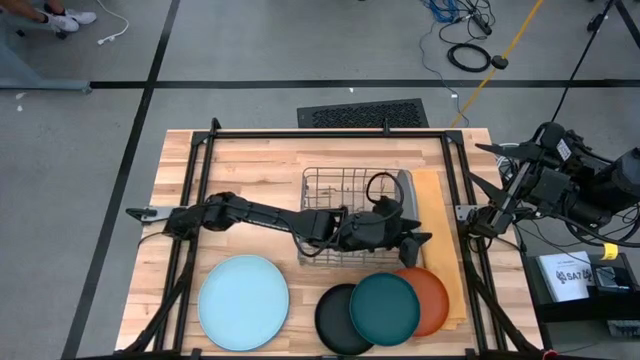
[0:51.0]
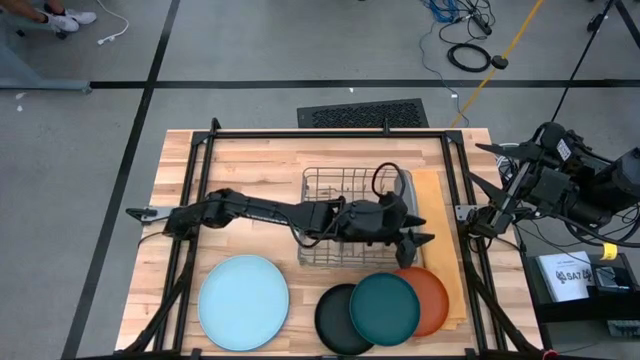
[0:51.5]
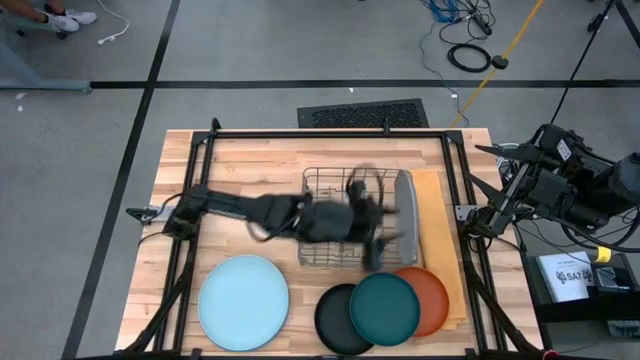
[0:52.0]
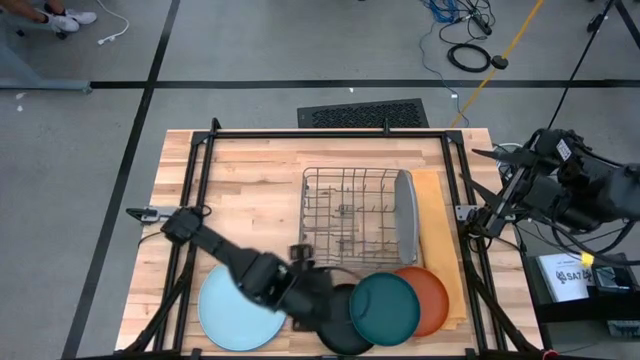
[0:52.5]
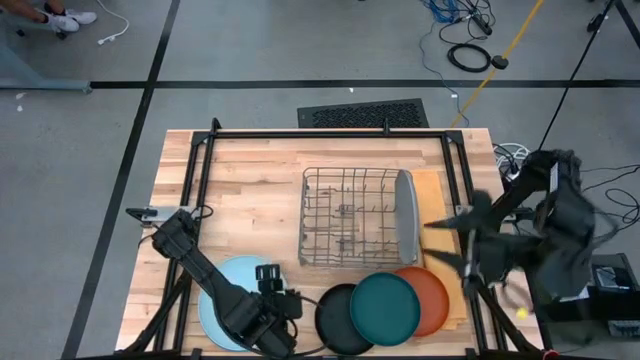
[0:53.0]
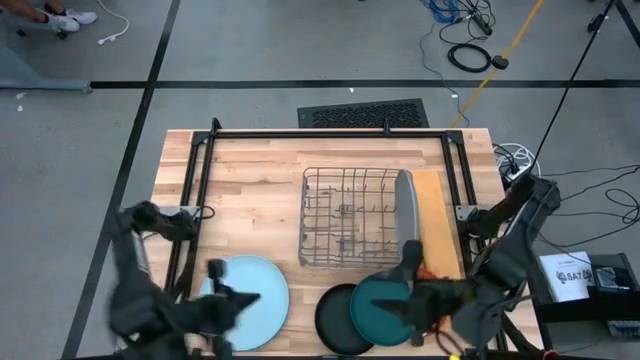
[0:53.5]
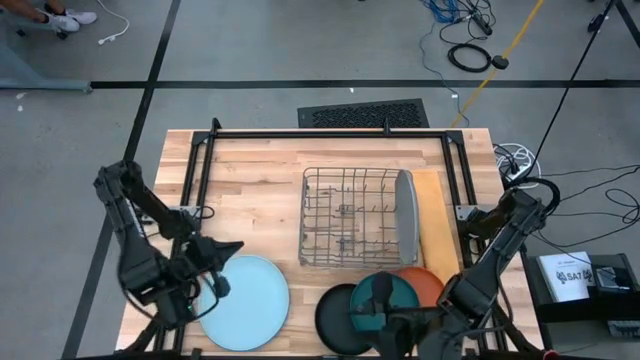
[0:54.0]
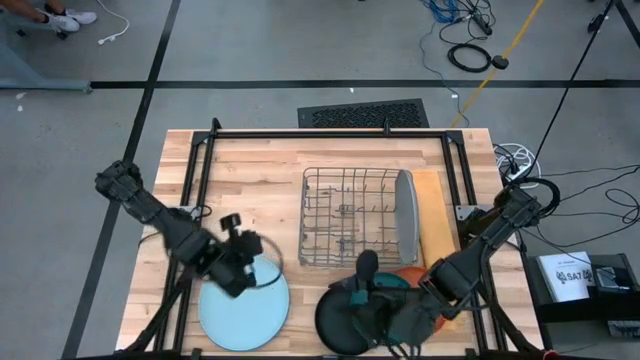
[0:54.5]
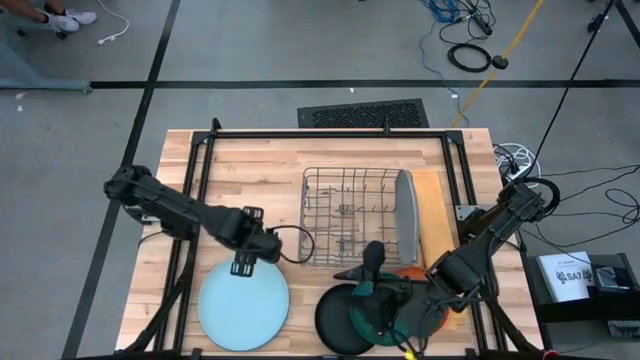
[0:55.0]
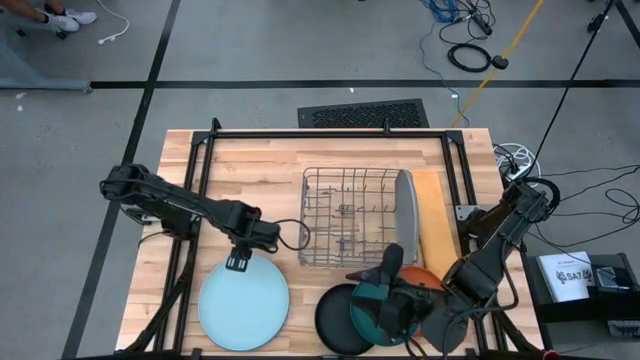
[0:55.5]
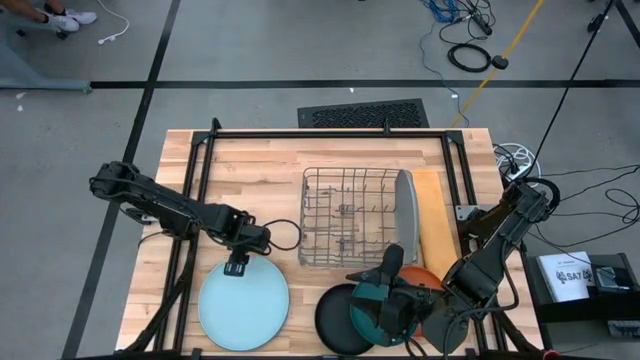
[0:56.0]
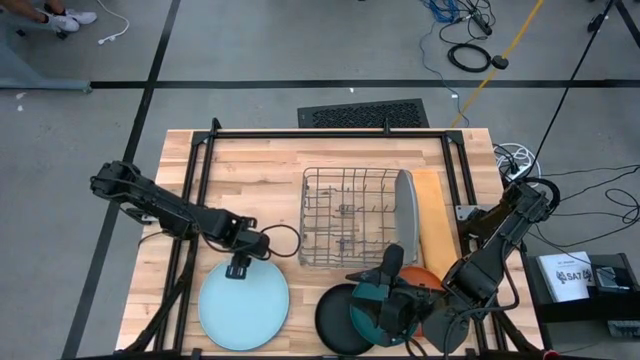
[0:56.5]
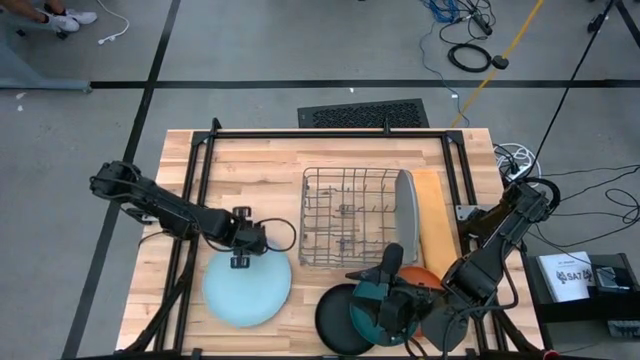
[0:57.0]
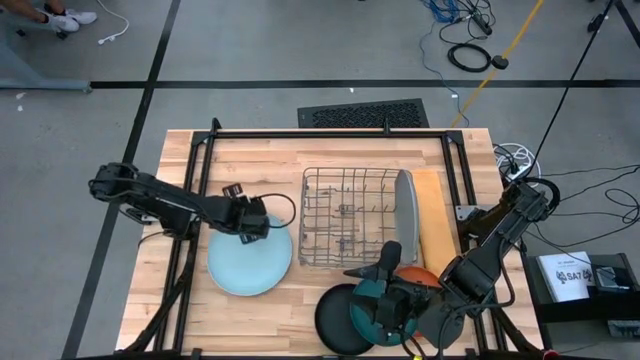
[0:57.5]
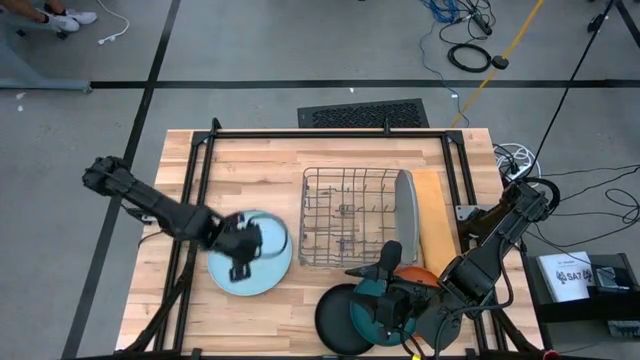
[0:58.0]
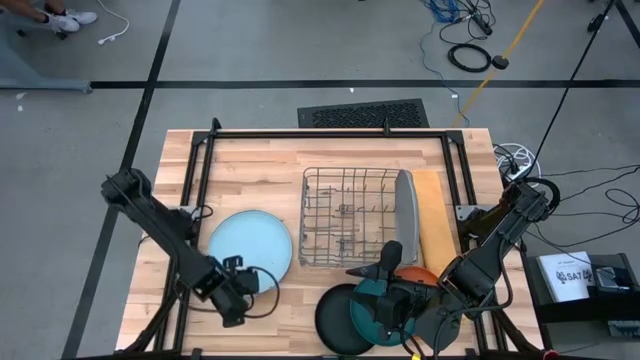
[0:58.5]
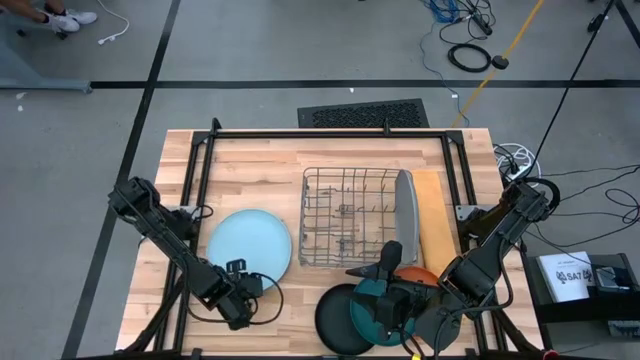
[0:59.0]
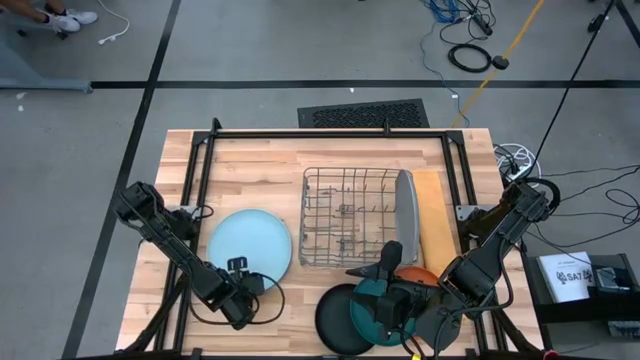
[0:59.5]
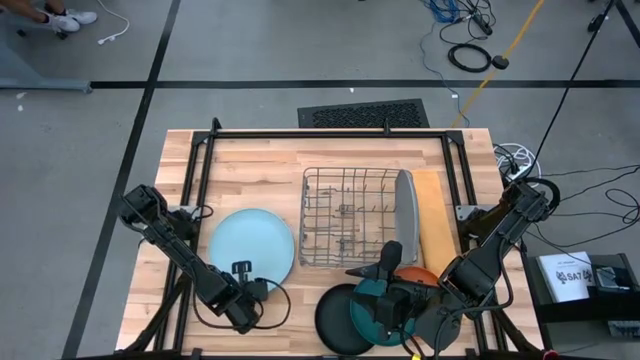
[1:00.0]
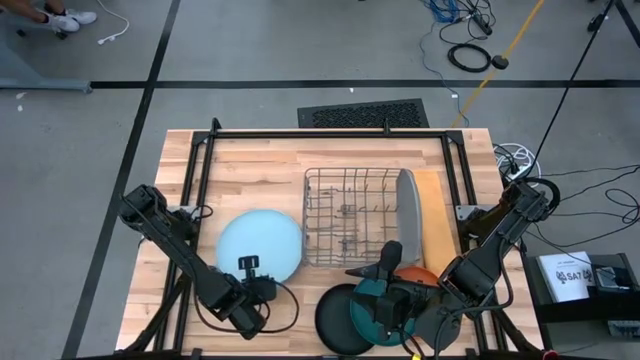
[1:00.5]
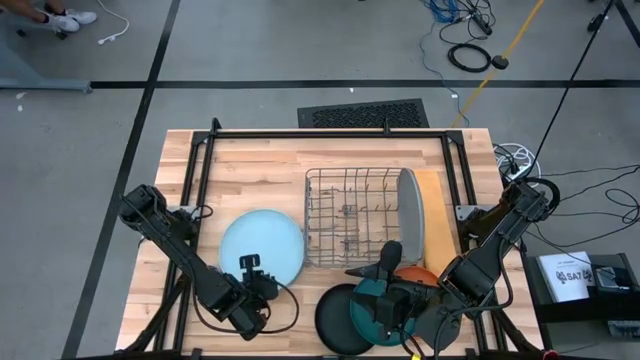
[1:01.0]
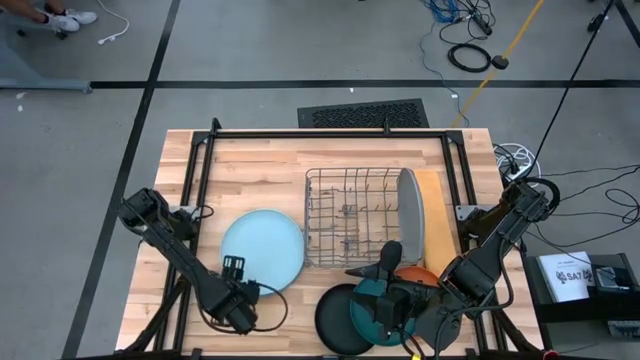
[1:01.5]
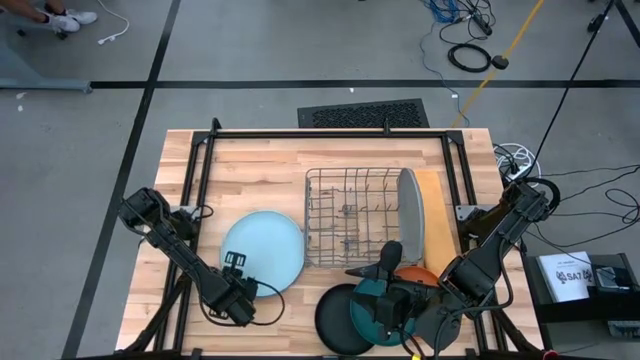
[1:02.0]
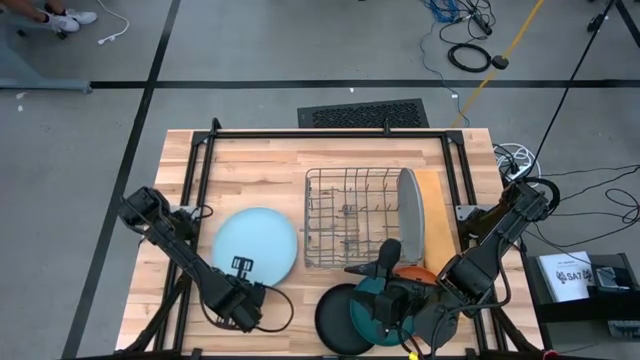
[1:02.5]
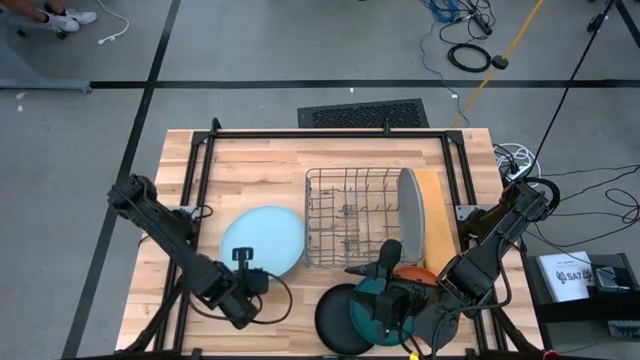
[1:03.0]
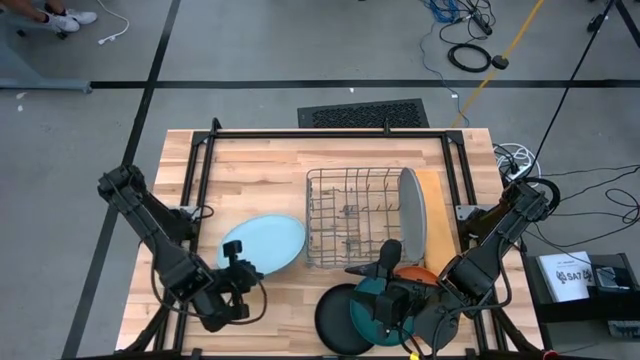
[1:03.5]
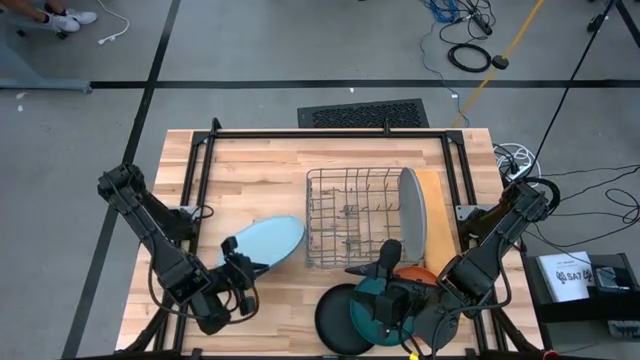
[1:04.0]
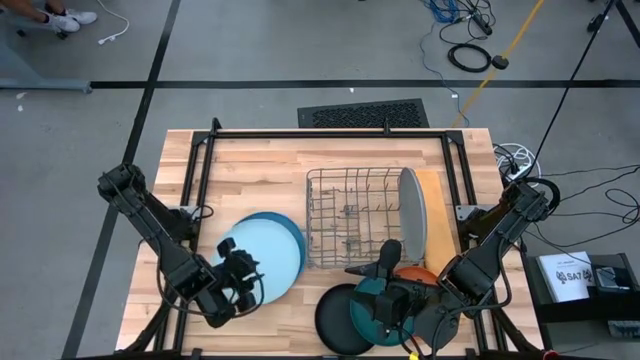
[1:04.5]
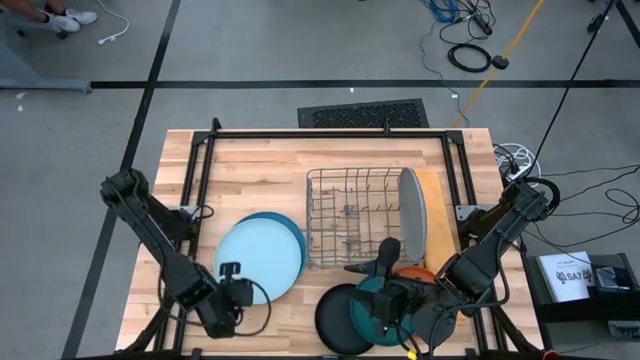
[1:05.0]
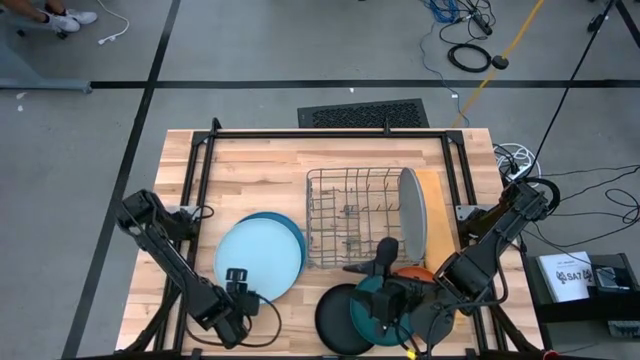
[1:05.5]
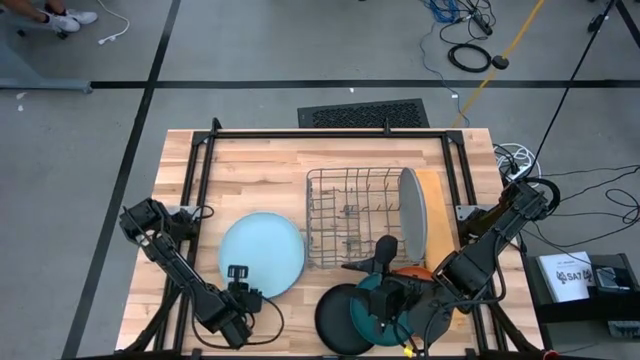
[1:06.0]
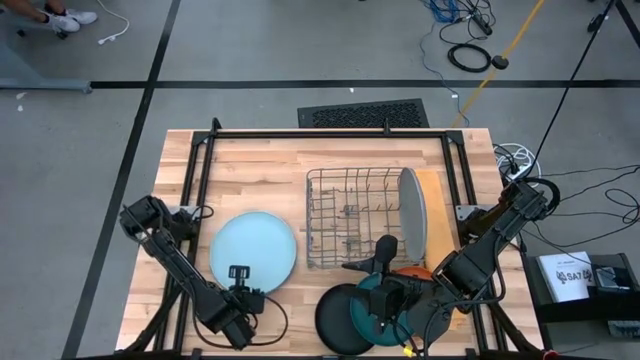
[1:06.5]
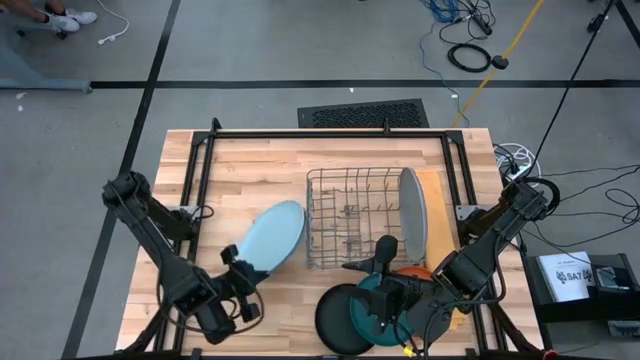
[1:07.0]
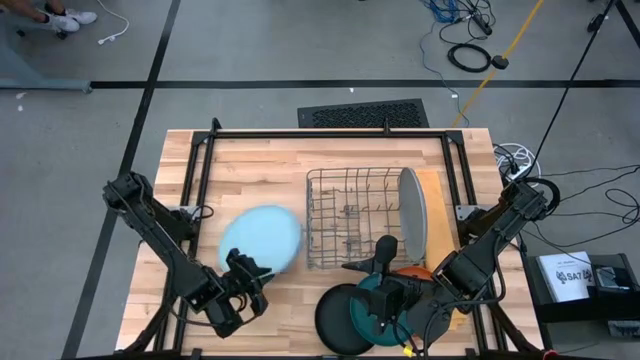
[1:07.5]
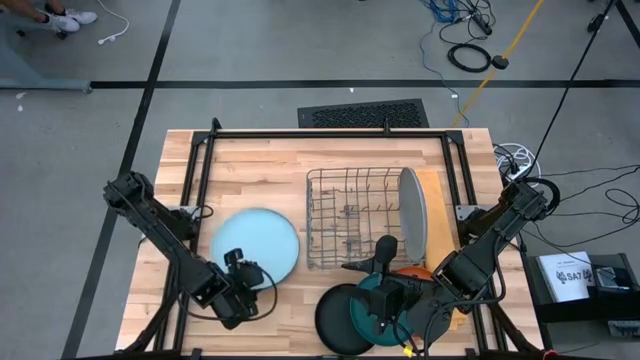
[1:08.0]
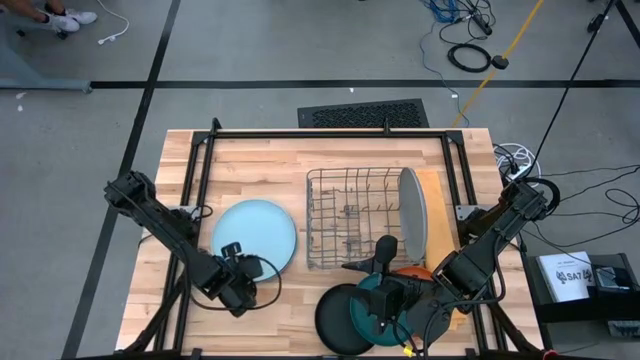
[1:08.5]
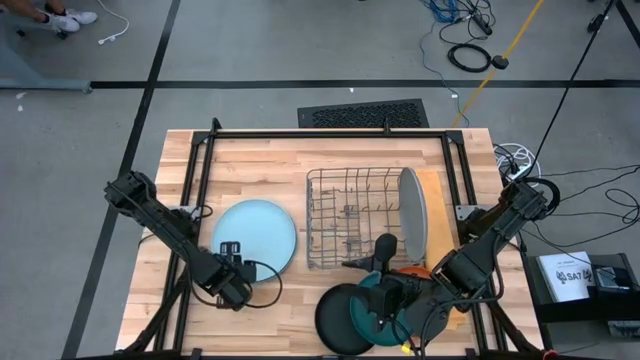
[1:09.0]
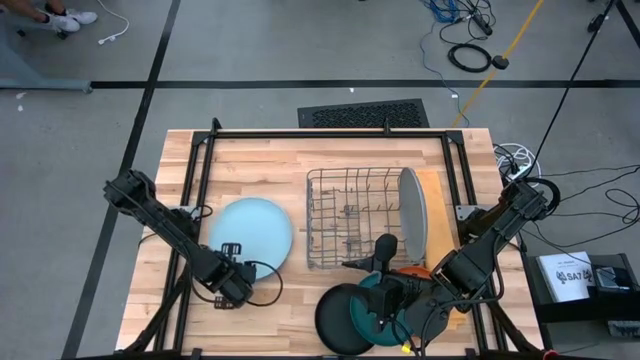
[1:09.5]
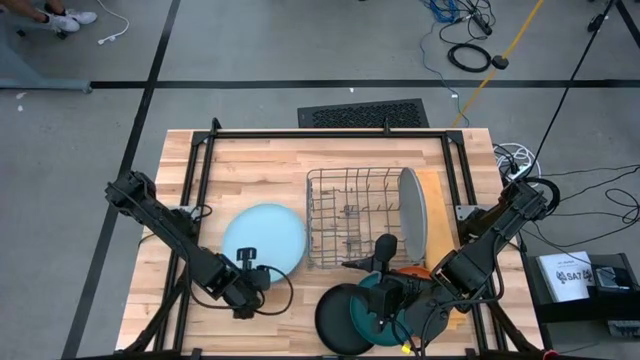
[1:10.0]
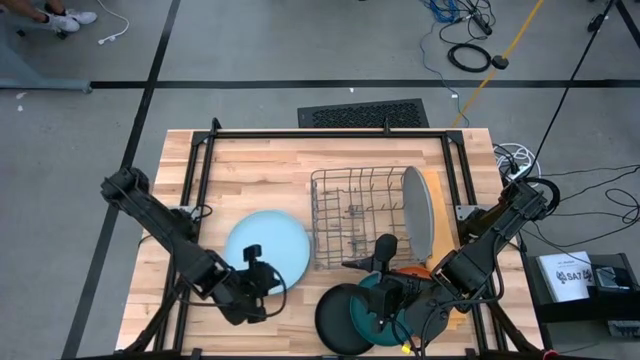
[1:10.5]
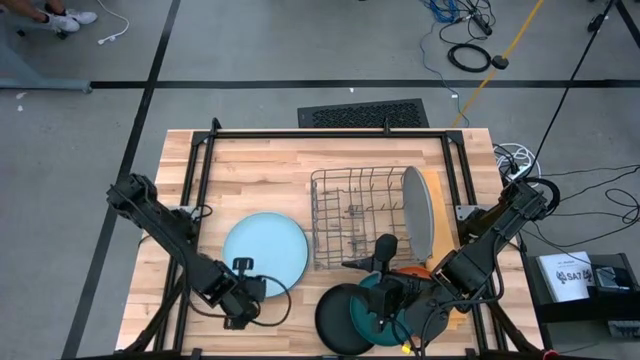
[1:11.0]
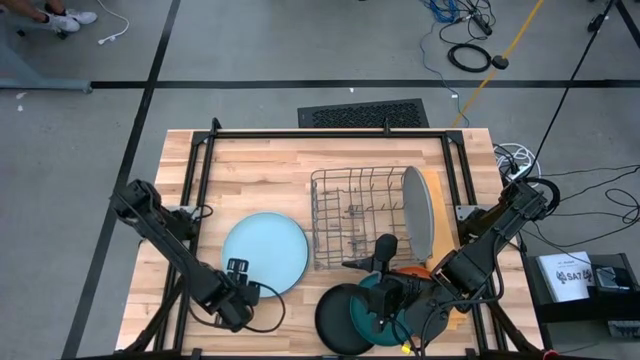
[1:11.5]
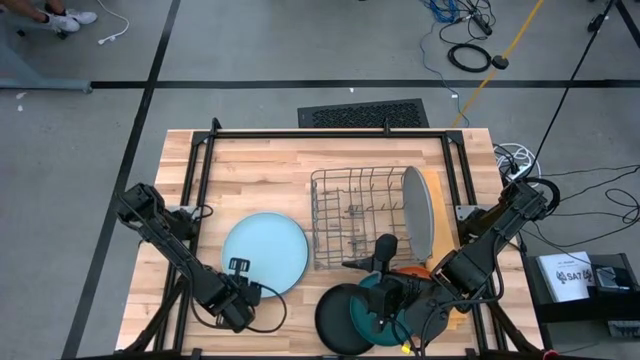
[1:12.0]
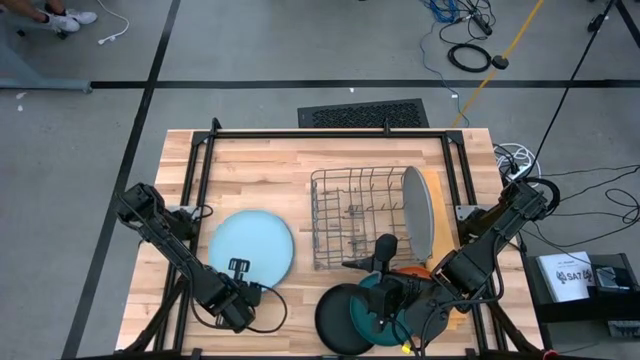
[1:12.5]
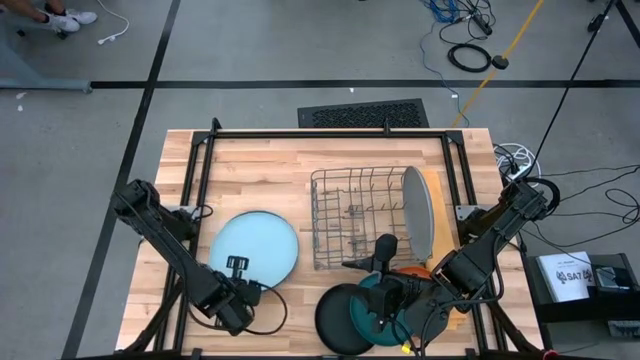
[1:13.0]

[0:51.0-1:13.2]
Task: Sort dishes
Put the light blue plate into the dish rack
